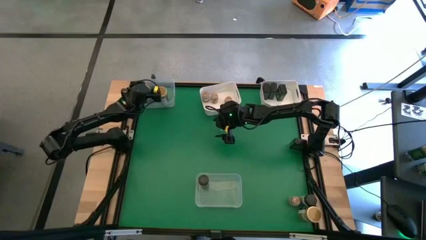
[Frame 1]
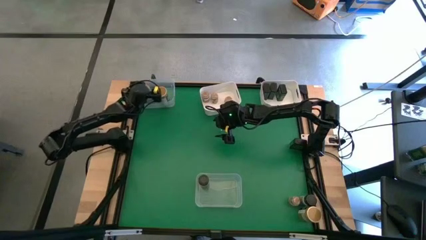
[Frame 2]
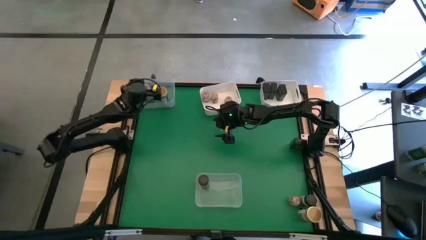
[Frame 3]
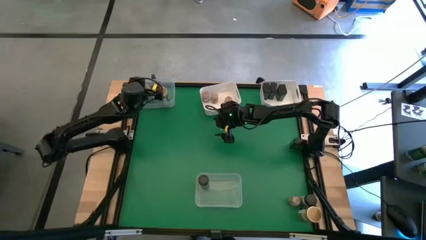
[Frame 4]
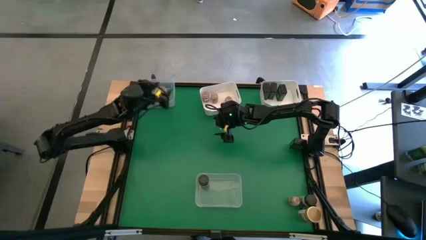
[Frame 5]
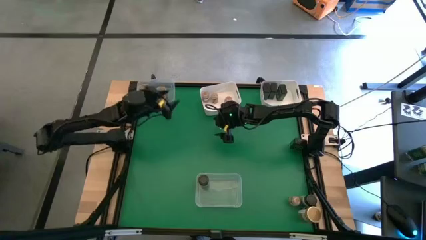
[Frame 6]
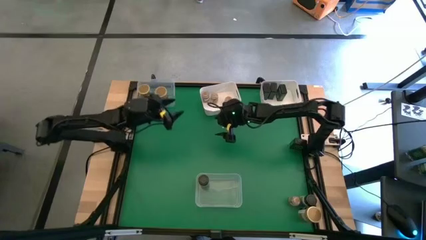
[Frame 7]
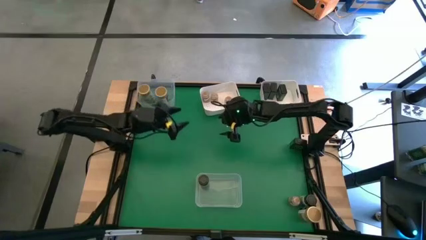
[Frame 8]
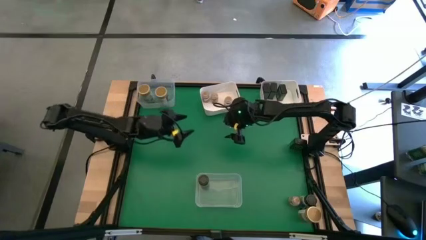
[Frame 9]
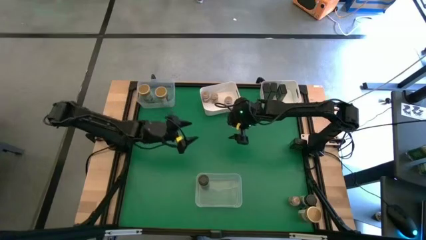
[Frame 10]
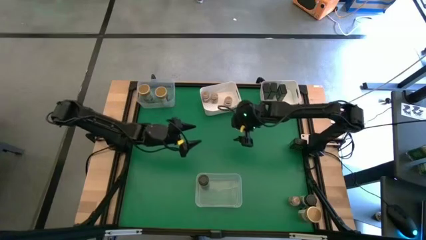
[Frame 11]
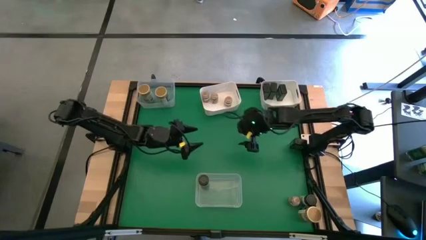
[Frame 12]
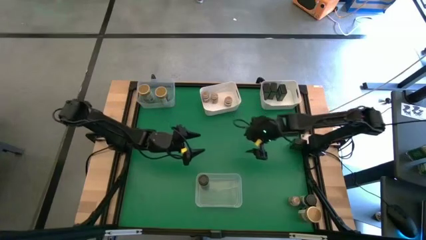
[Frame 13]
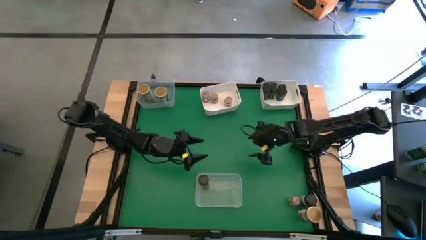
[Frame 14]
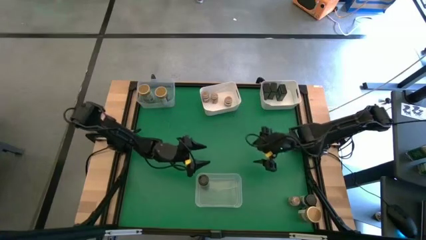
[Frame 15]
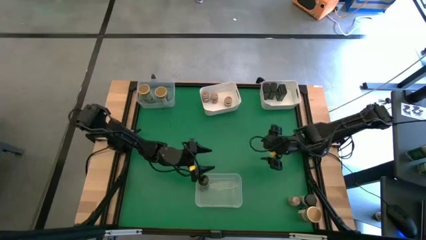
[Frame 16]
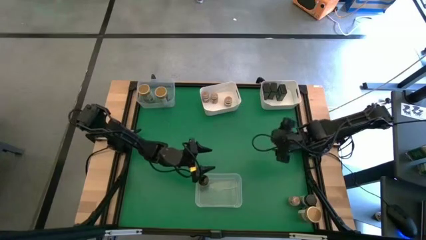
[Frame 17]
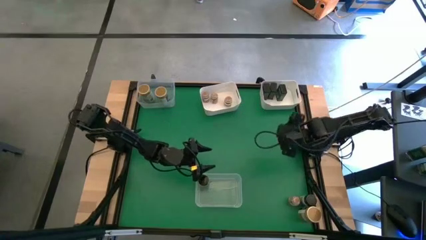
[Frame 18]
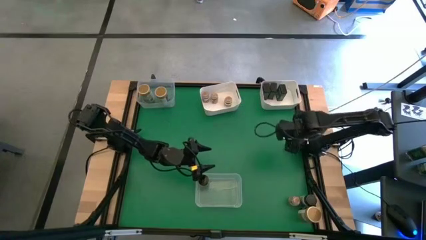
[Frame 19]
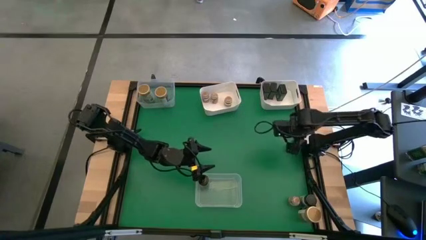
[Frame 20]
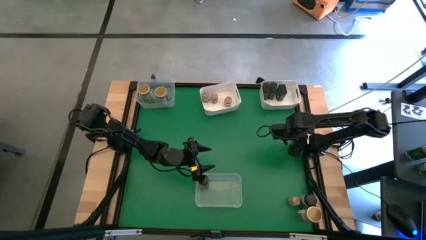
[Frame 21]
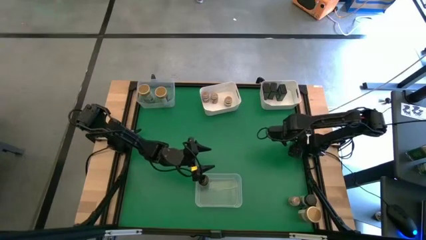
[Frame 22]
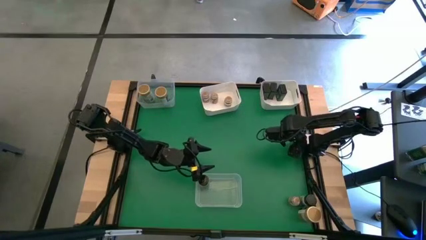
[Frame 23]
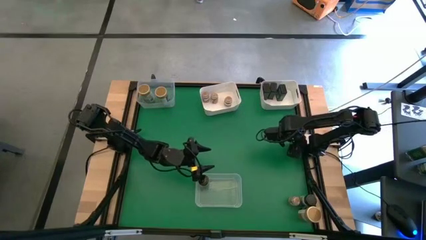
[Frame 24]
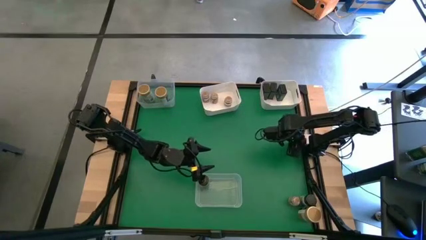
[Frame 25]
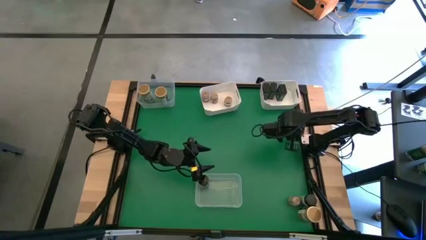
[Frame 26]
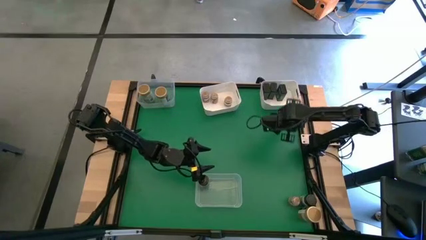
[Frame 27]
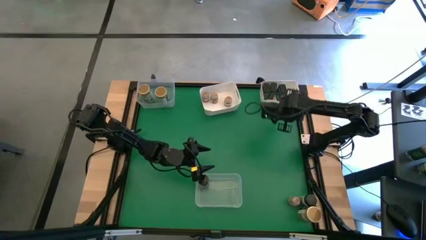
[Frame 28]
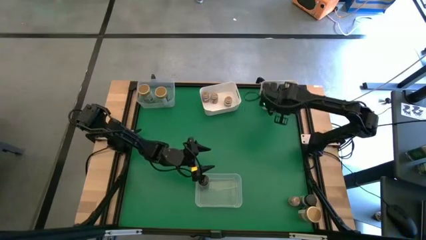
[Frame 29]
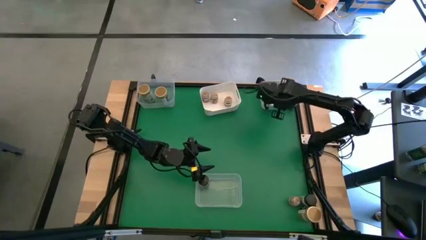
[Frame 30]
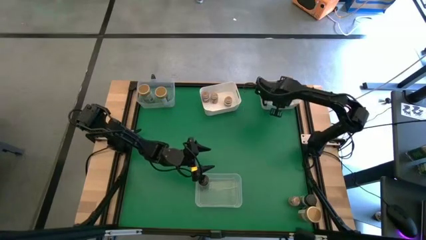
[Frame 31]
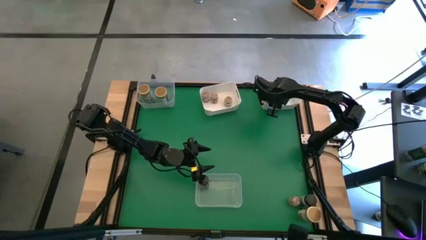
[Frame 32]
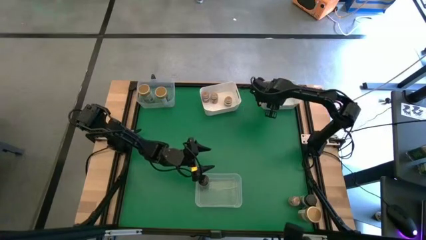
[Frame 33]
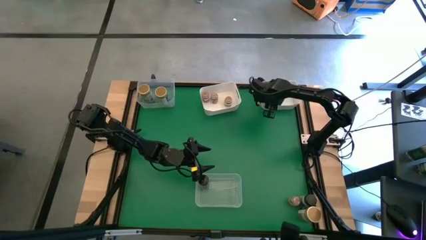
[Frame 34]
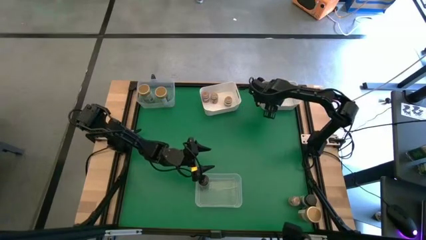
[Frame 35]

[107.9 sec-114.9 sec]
Task: Sort spices by type
Put the green seasoning can into the right white bin

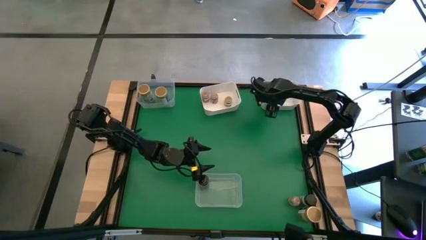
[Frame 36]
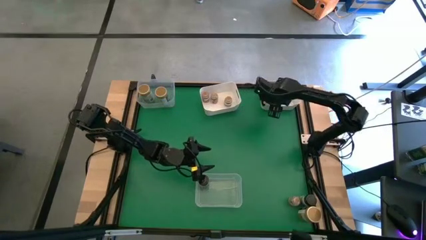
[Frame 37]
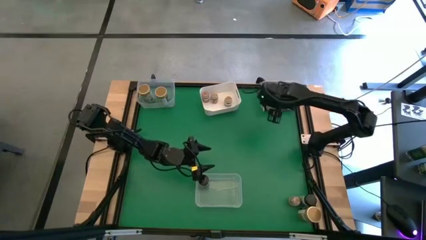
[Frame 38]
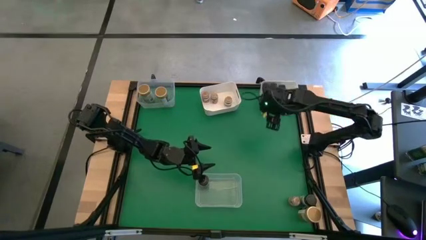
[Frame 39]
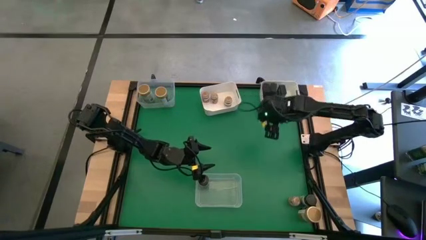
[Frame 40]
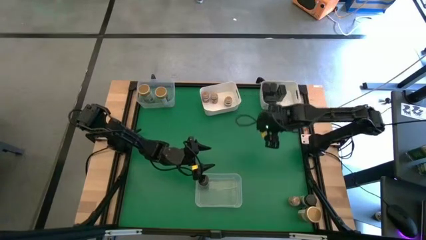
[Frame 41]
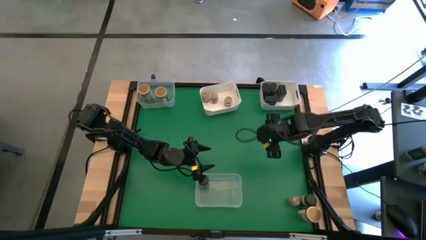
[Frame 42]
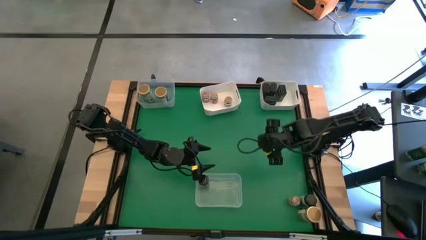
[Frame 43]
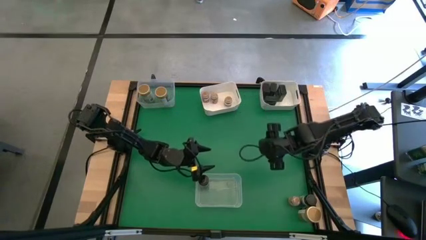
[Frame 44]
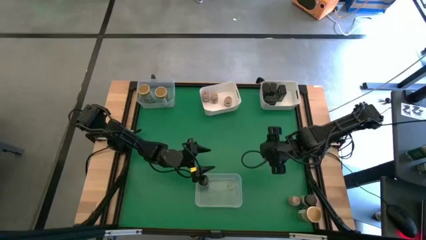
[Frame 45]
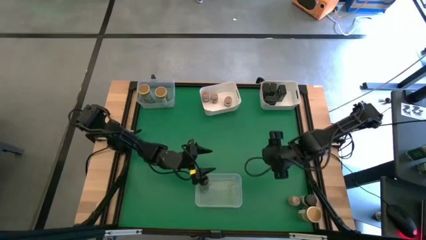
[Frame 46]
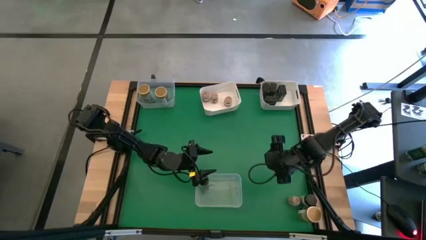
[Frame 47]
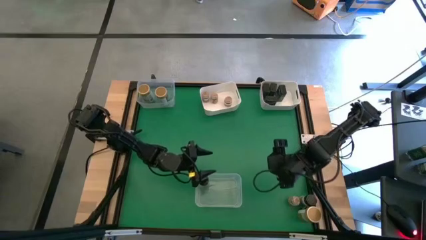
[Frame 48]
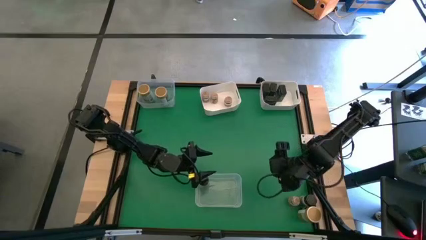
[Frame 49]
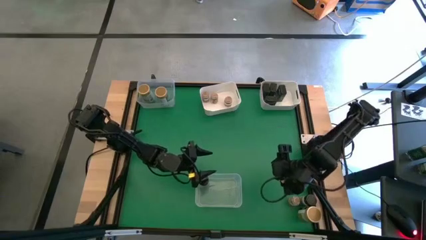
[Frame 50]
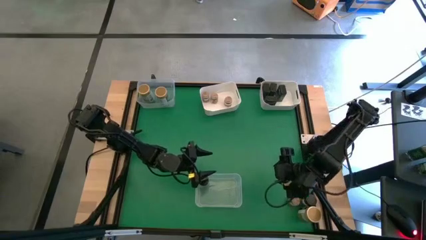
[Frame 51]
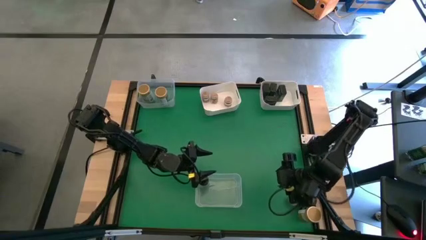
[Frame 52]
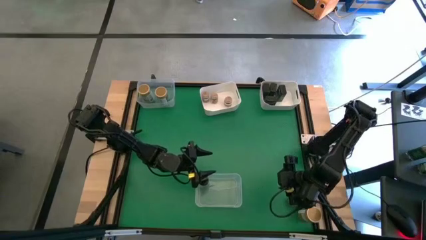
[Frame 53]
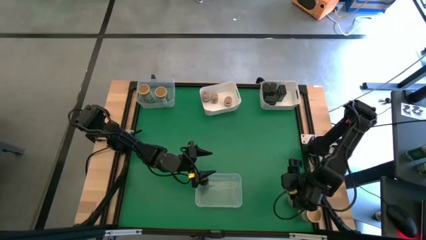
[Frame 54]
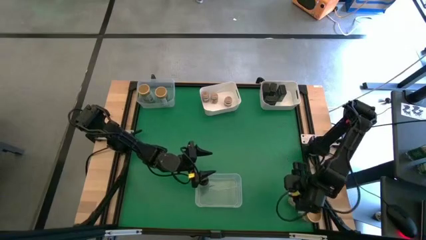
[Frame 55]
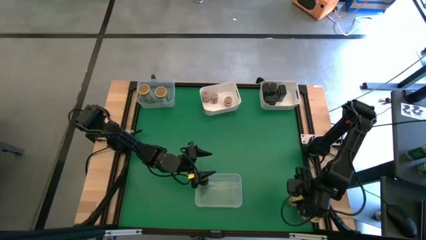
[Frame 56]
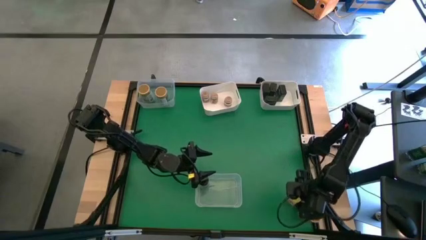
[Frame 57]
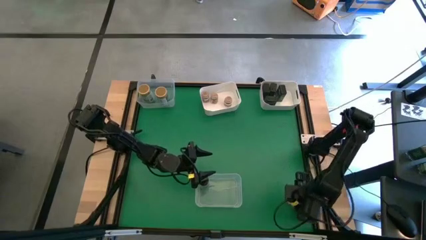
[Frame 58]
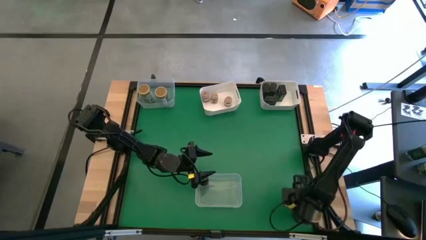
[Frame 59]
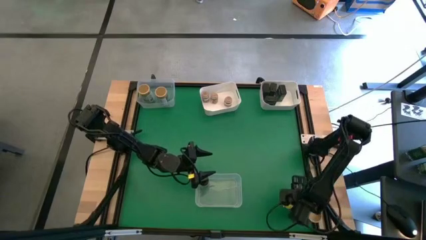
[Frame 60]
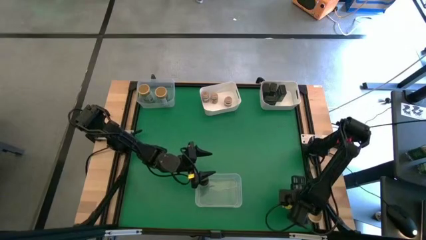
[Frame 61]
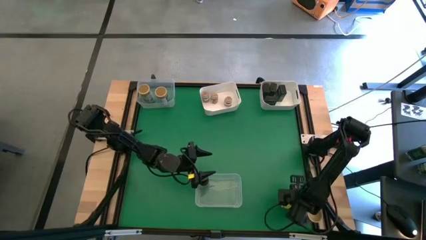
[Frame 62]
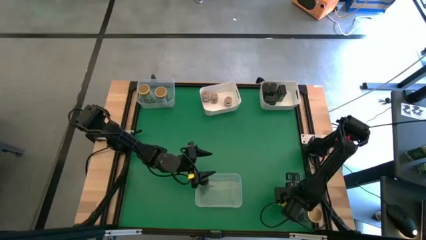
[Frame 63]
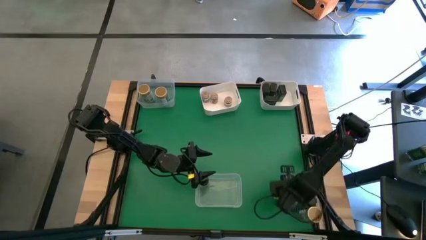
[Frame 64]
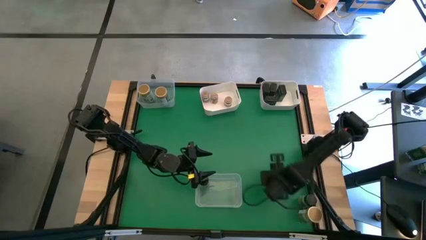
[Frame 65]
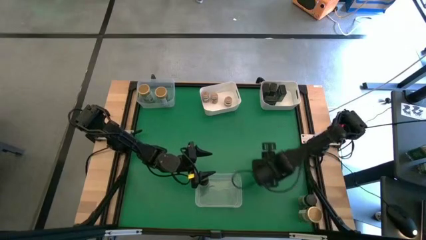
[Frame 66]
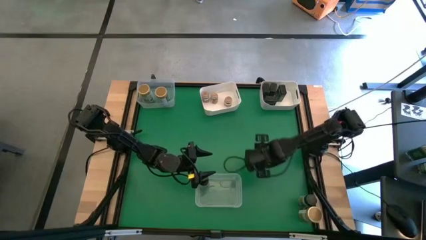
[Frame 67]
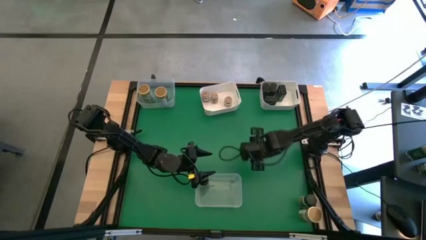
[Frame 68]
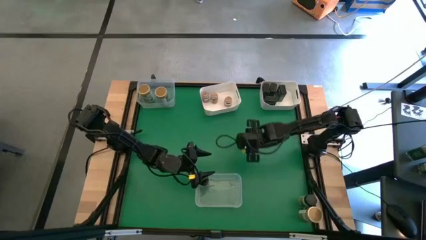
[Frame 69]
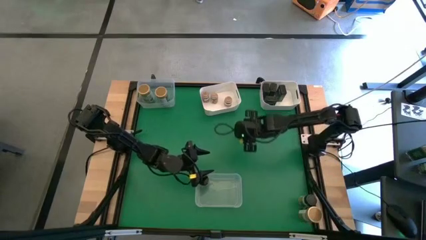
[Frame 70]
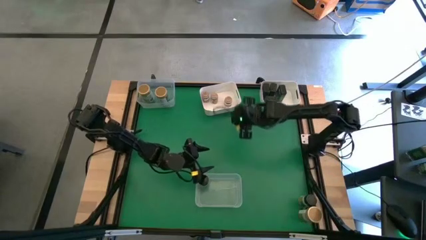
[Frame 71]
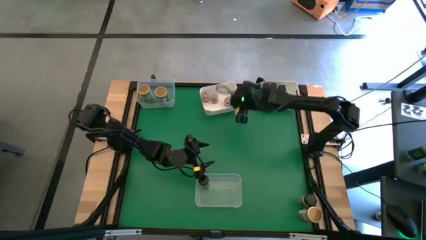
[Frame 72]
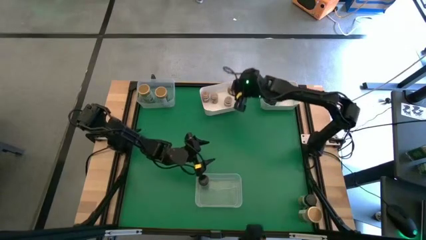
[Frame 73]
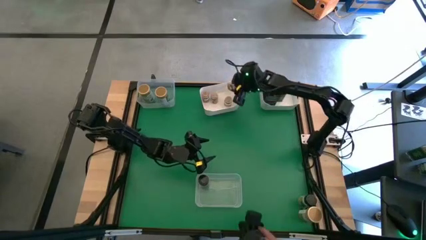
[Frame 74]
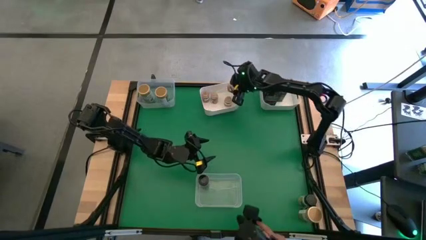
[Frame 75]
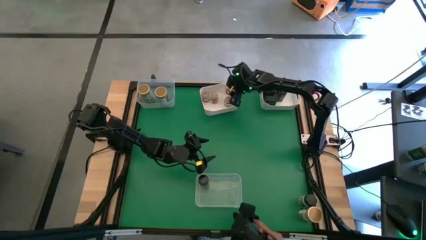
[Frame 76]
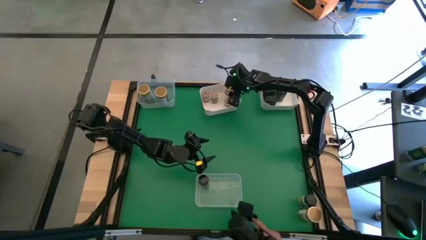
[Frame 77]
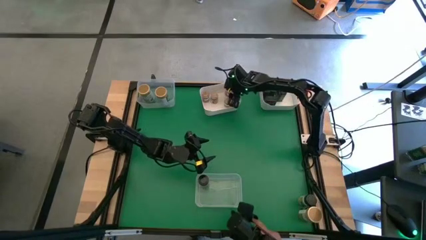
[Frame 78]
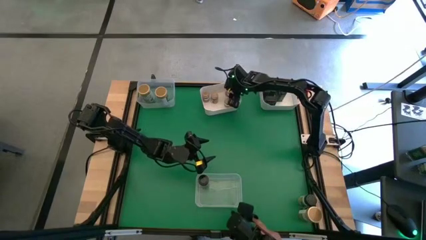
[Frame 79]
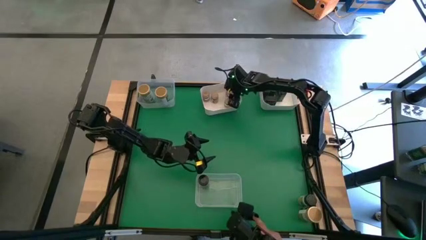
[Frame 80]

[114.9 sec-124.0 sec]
Put the brown seasoning bottle into the left white bin

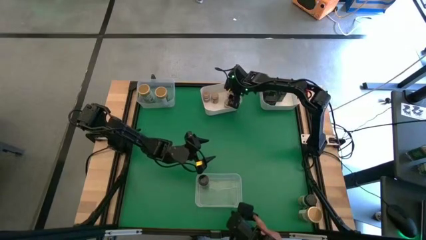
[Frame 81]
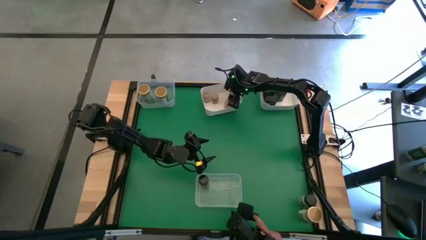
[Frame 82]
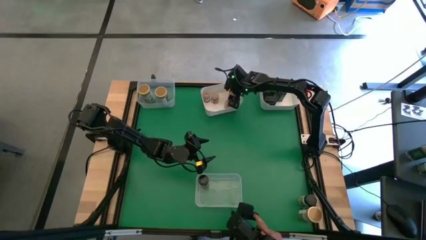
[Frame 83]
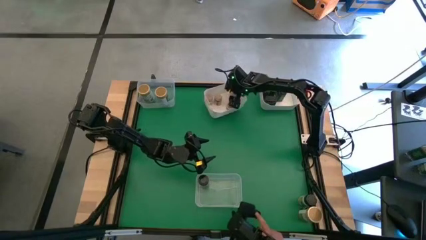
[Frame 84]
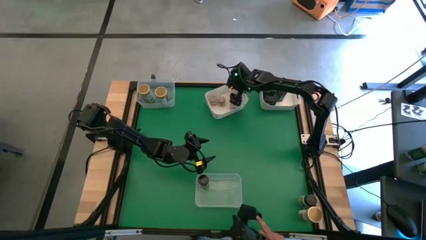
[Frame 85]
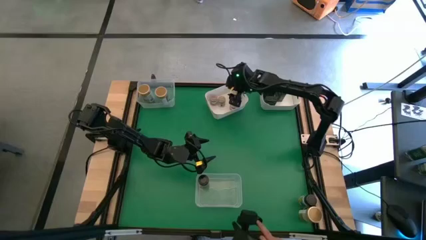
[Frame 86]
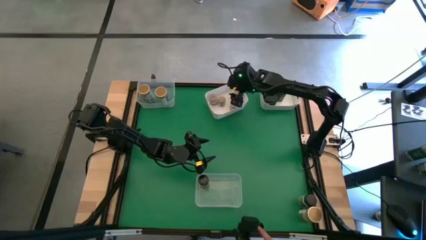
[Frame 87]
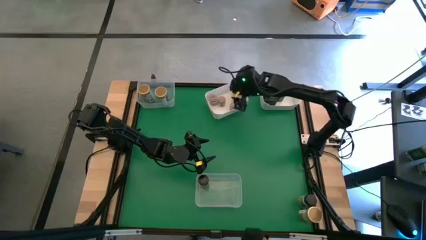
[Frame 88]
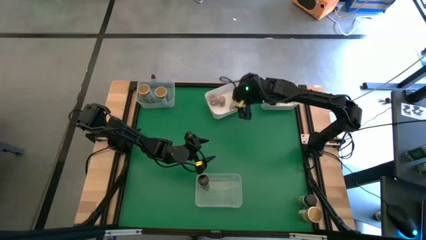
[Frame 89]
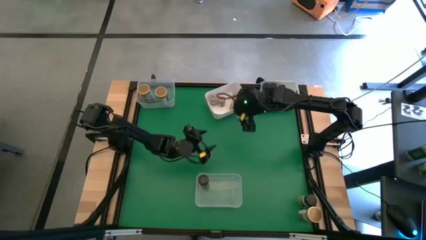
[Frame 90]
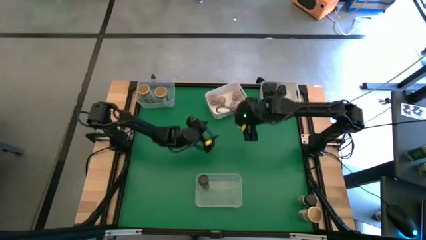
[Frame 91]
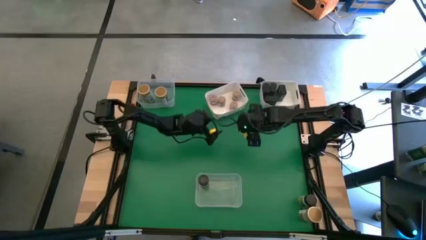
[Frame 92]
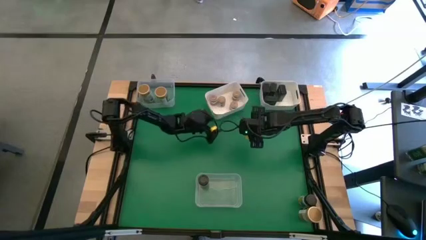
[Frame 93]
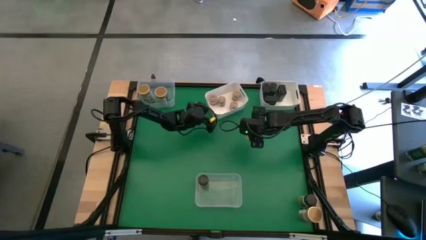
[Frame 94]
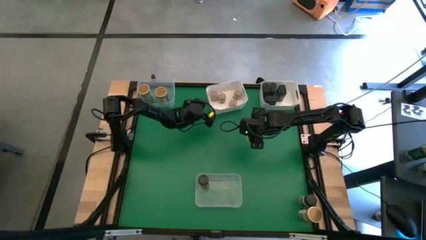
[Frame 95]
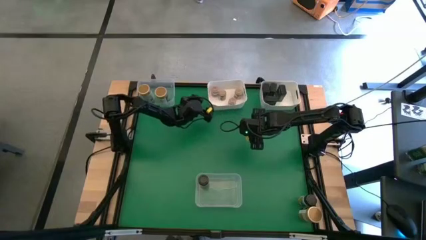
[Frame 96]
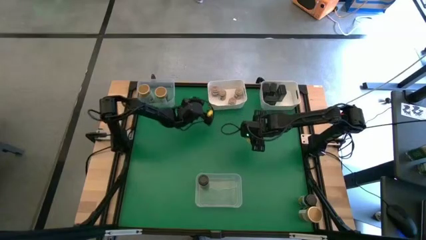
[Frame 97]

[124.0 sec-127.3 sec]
Adjust the left white bin
